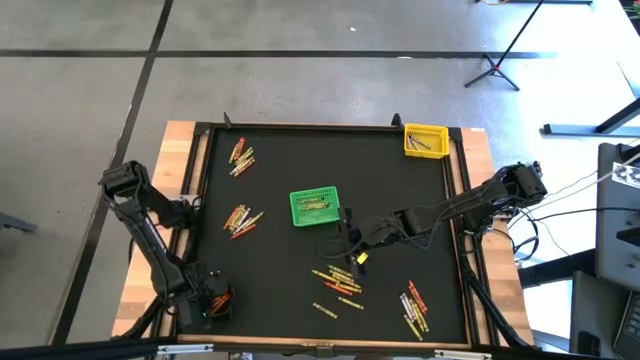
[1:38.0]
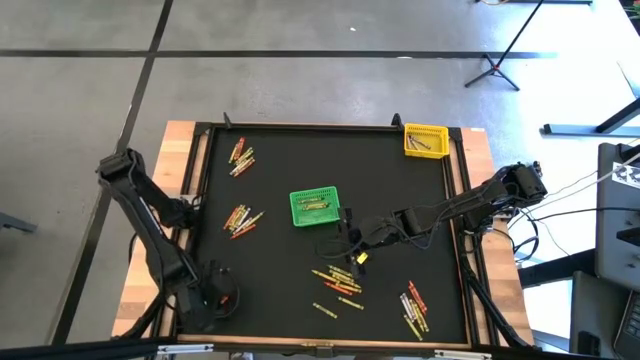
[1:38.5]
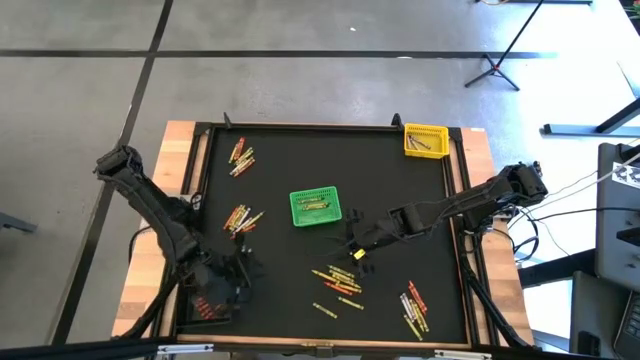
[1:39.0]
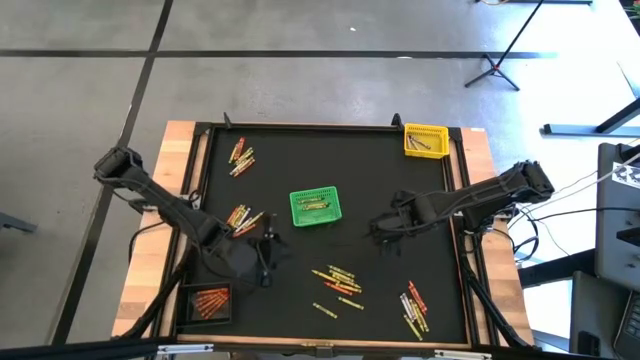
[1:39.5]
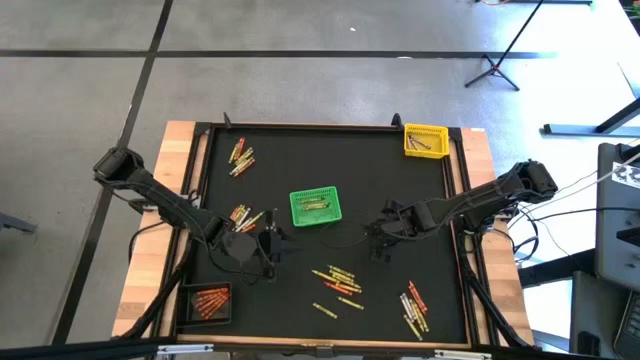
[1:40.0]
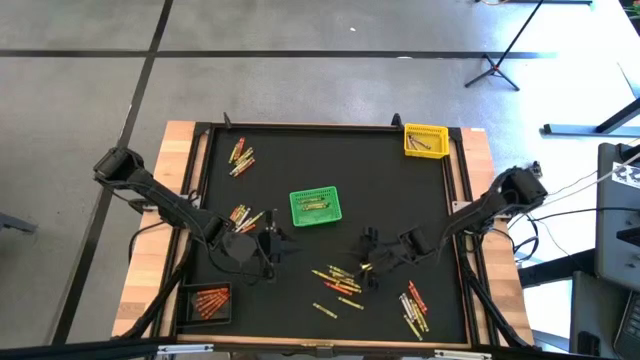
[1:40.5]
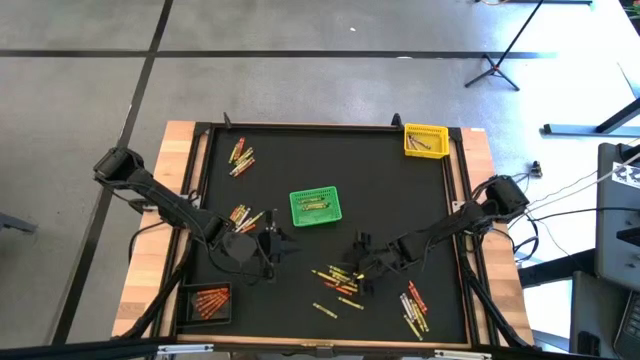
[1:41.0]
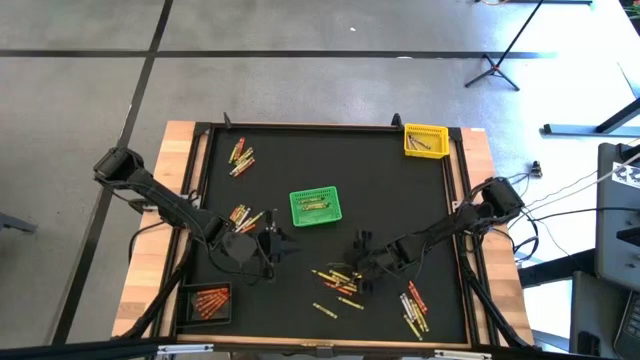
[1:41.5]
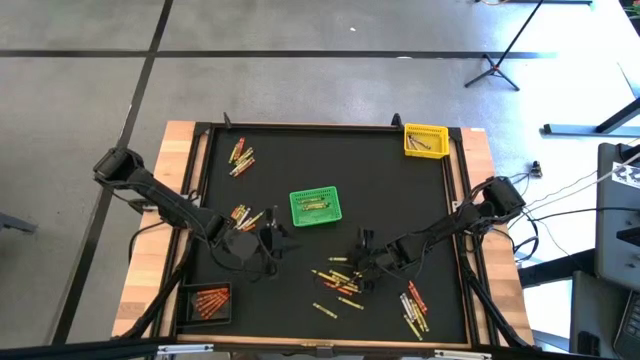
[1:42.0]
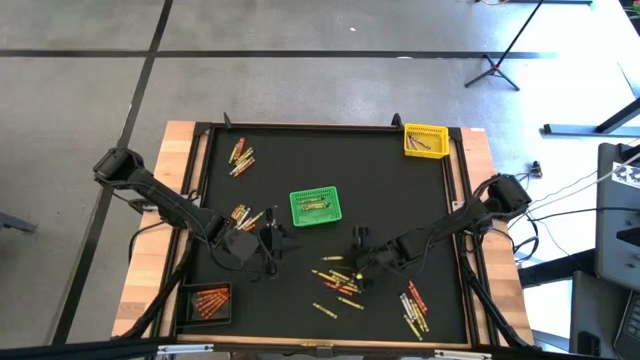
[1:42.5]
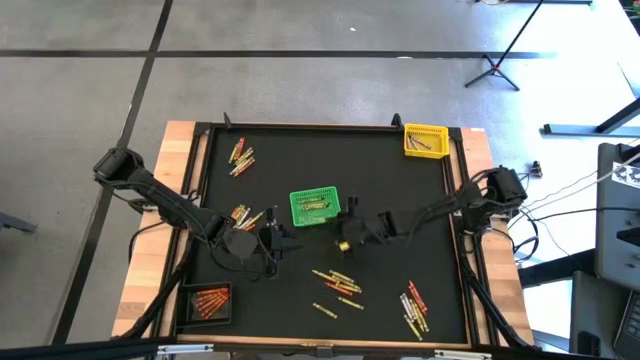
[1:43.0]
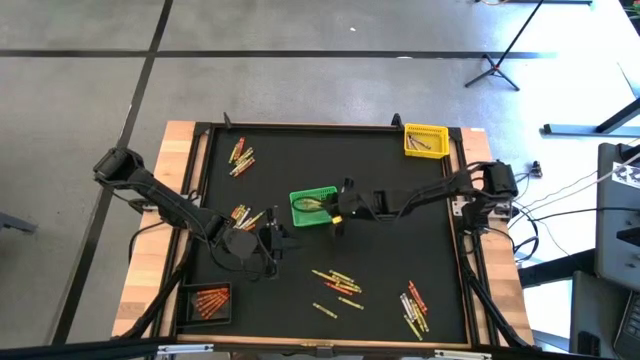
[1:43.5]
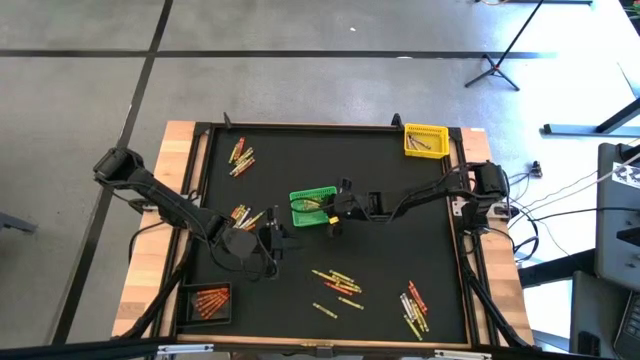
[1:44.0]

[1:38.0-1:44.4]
Task: Sort crayons
Put the green crayon into the green bin

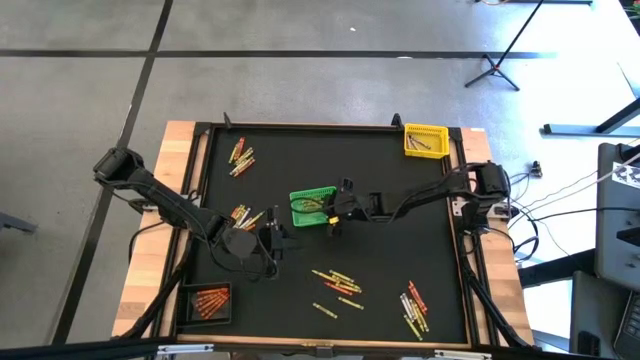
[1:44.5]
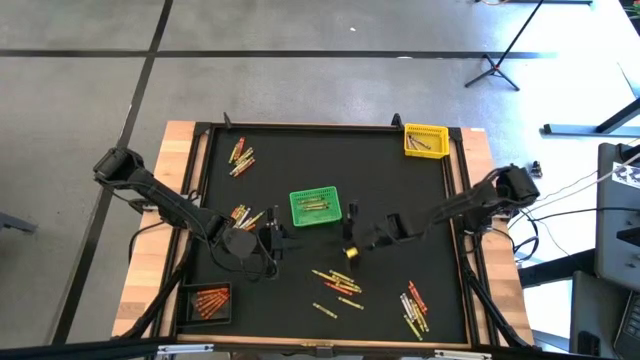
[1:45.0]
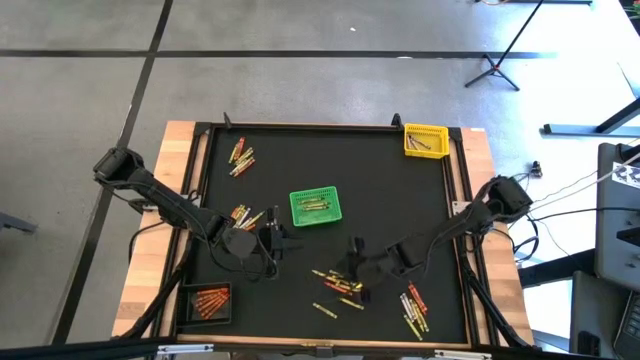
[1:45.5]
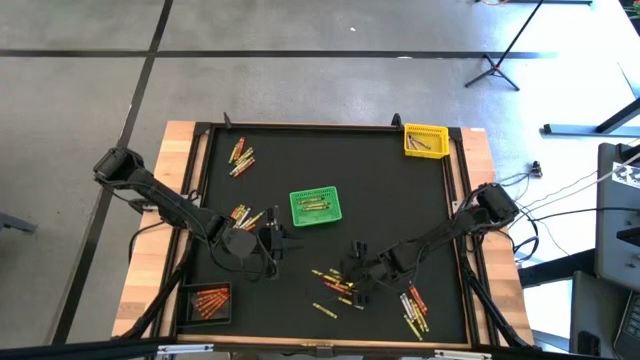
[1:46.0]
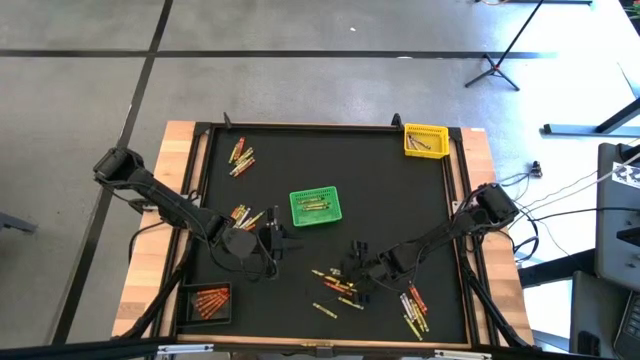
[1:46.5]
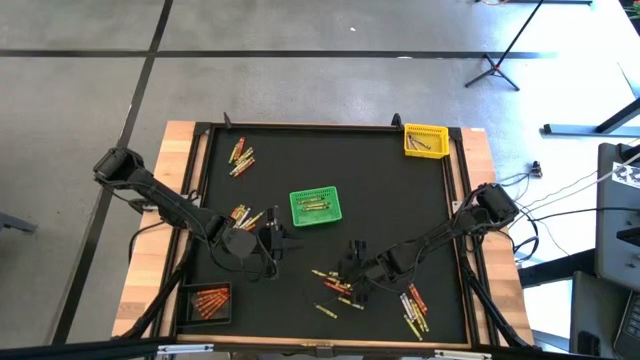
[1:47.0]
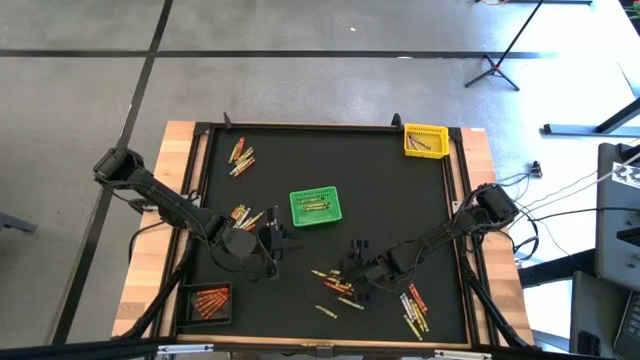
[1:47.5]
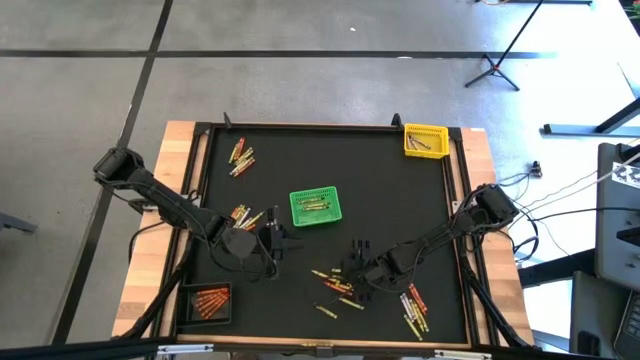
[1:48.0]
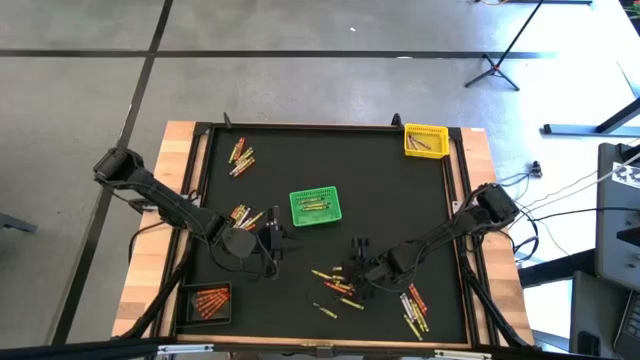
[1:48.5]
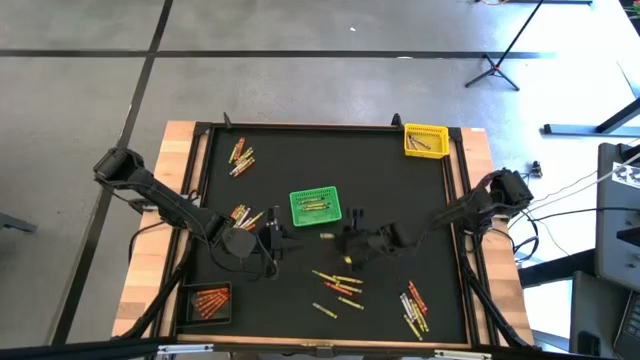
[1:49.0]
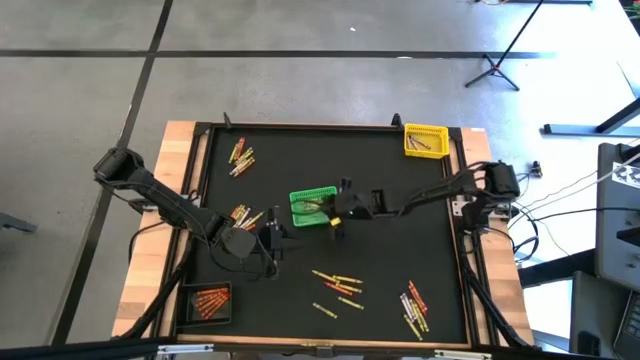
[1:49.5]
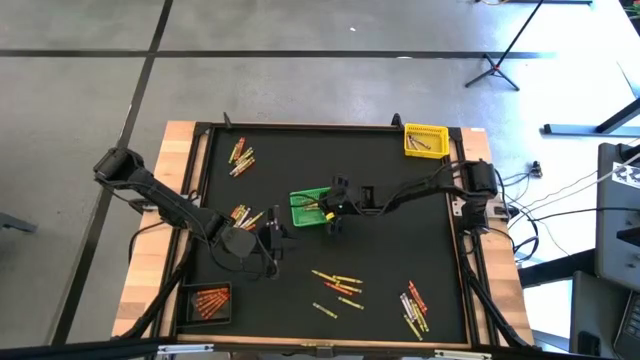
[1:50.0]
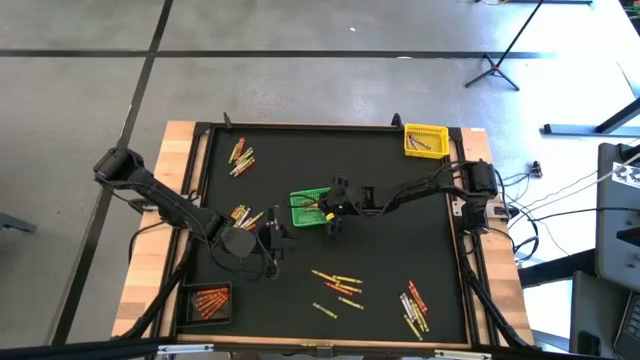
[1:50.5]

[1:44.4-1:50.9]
Put the green crayon into the green bin

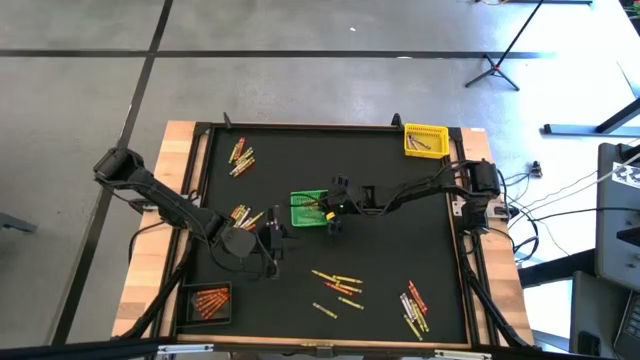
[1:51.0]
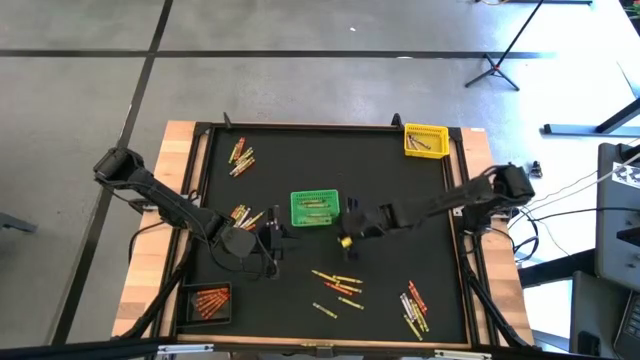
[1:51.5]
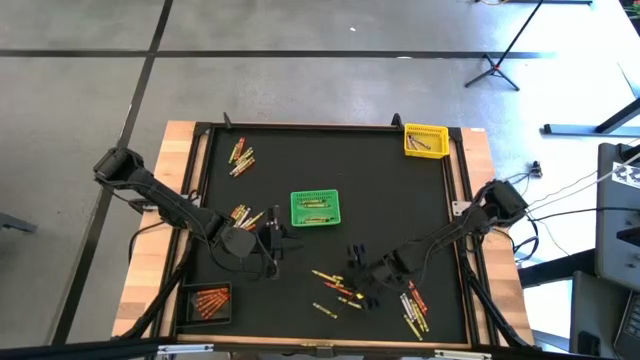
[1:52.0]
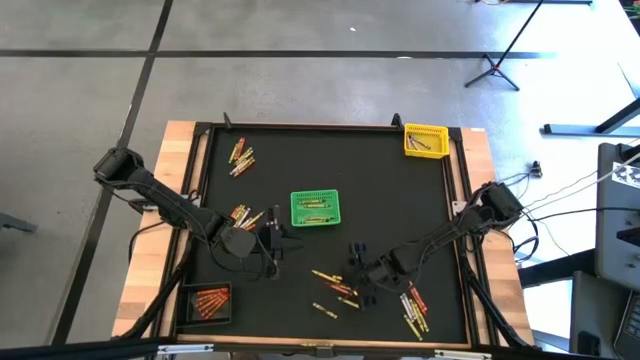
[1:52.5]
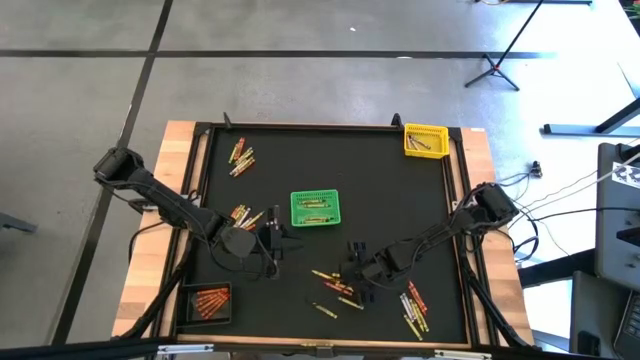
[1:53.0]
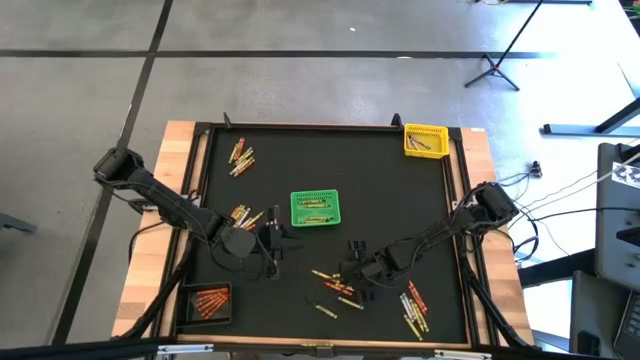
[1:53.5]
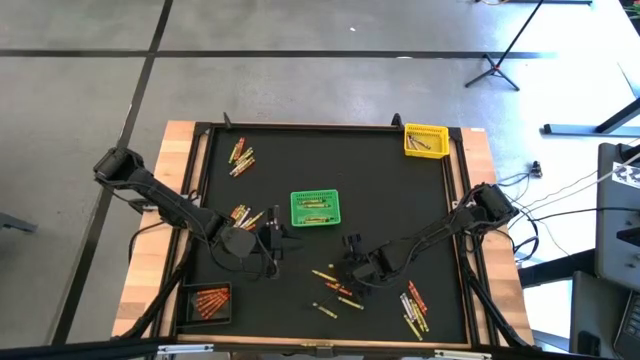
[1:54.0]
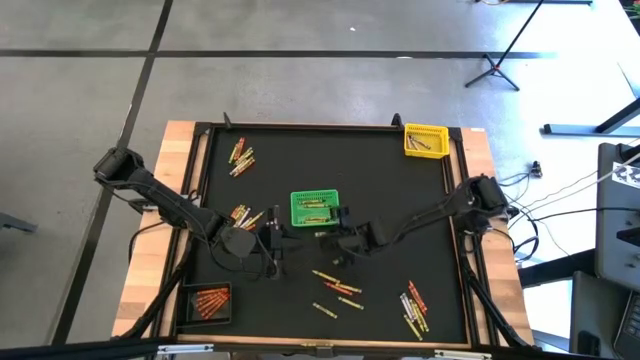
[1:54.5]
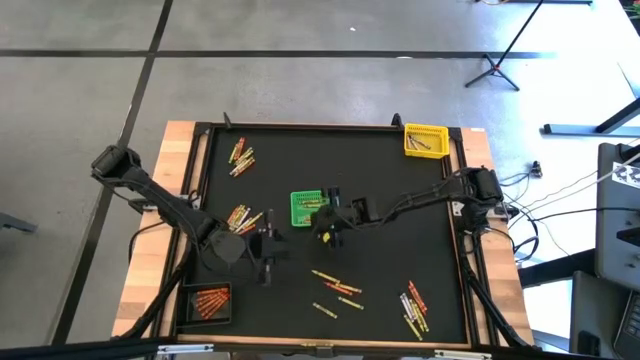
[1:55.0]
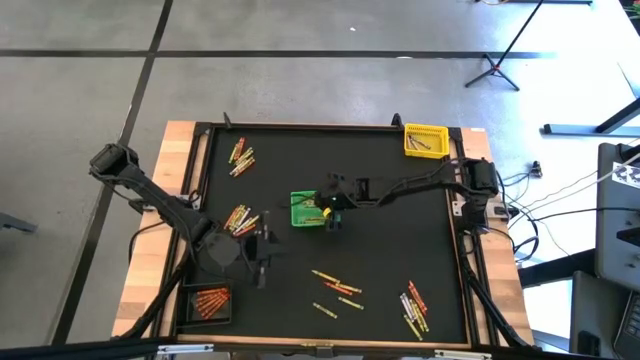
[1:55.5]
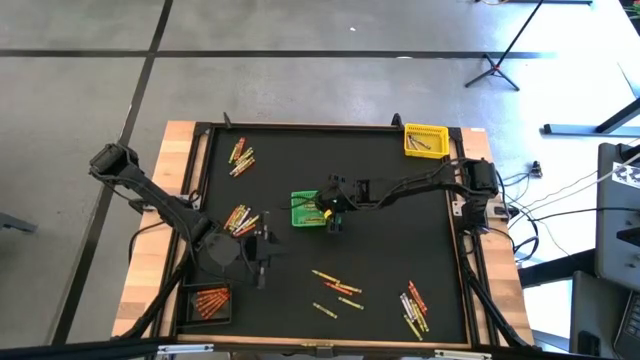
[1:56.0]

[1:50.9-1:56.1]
Put the green crayon into the green bin

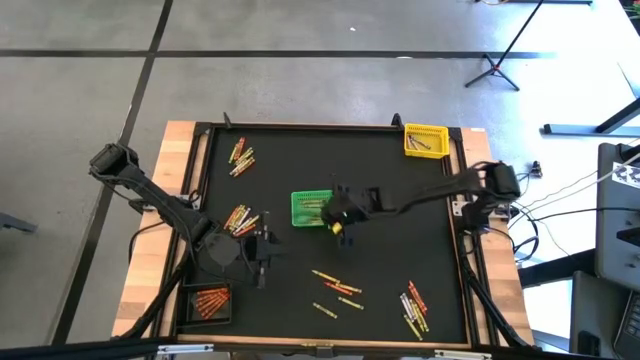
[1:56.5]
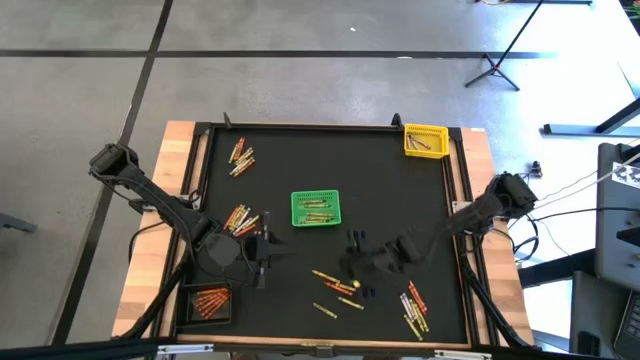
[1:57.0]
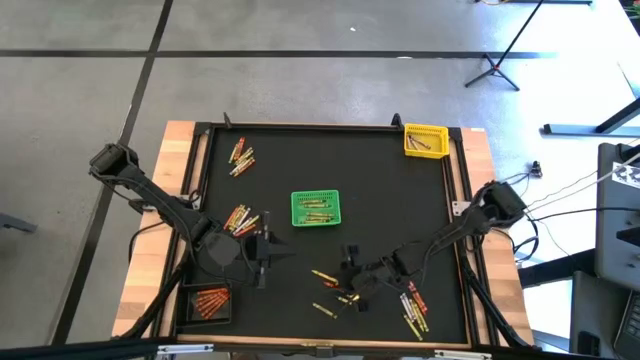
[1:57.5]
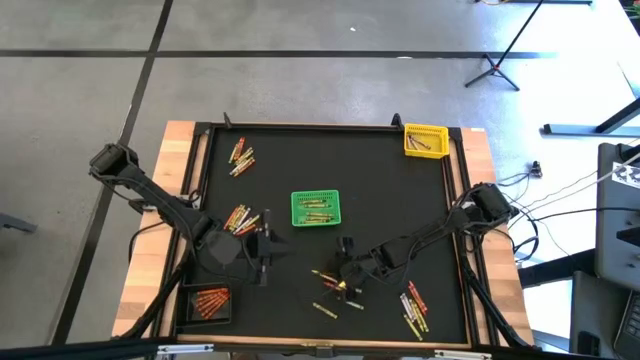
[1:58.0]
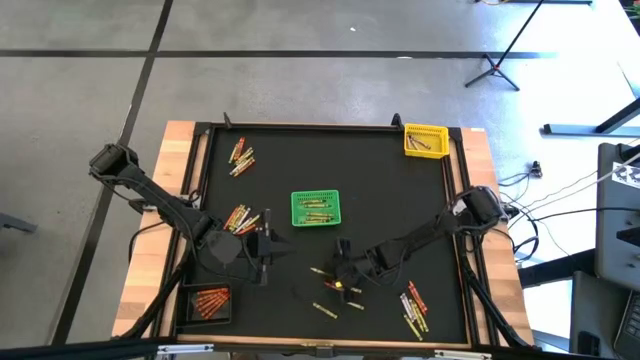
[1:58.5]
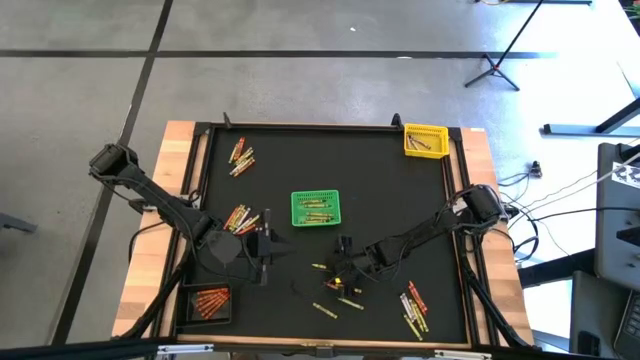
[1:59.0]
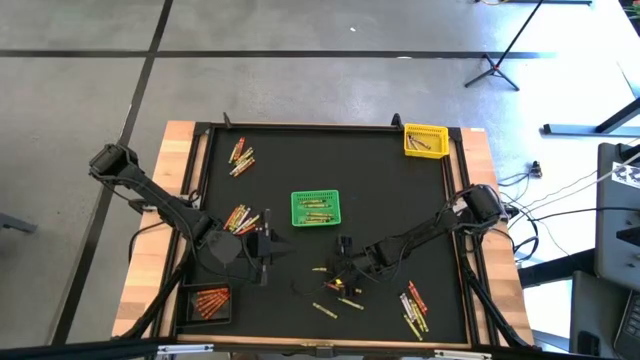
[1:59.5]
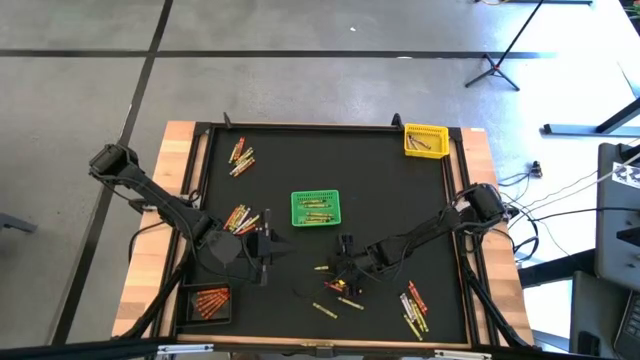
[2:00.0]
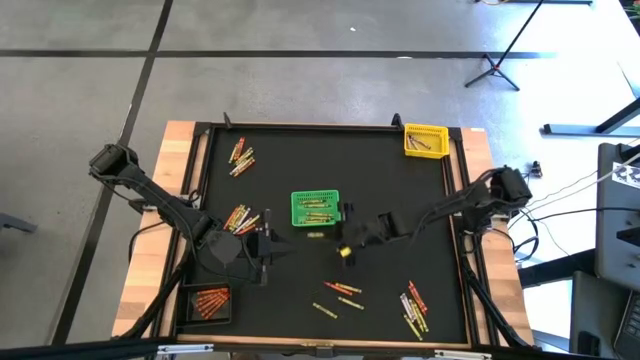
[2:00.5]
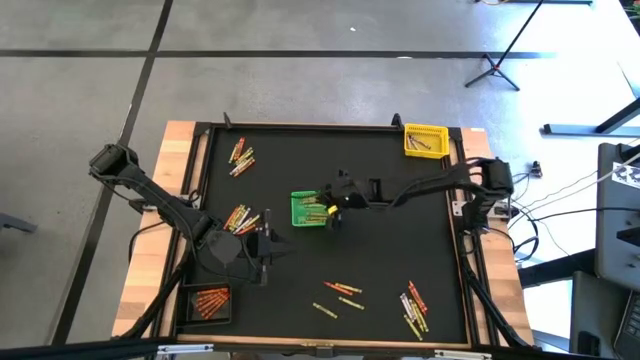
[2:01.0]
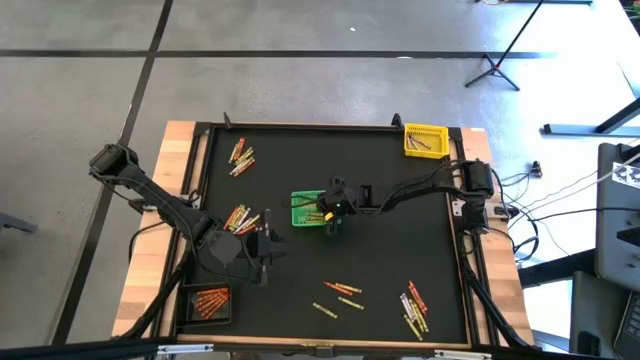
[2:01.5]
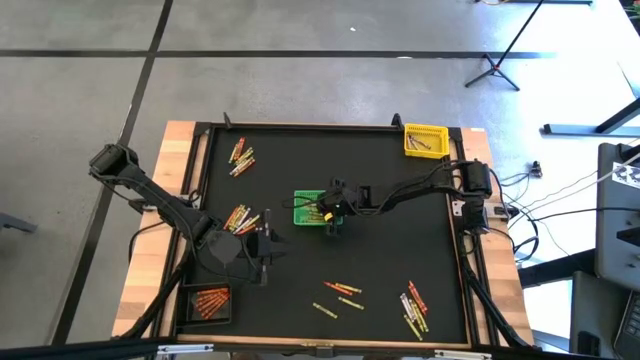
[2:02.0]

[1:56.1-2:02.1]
Put the green crayon into the green bin
